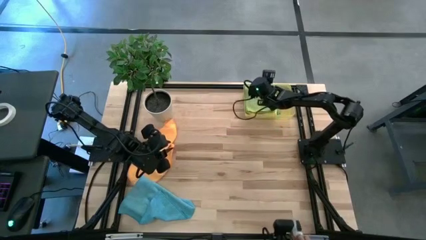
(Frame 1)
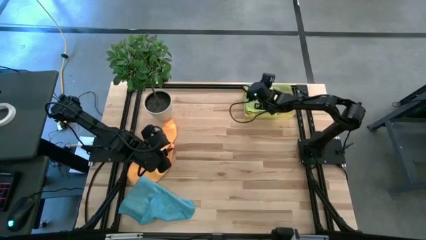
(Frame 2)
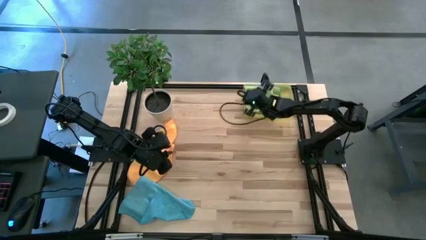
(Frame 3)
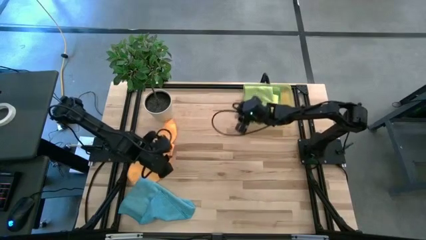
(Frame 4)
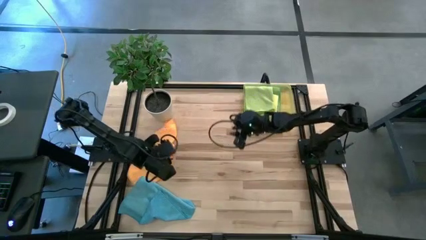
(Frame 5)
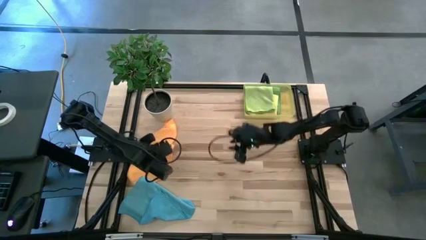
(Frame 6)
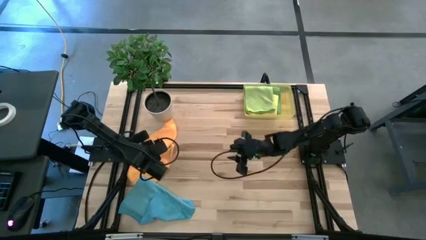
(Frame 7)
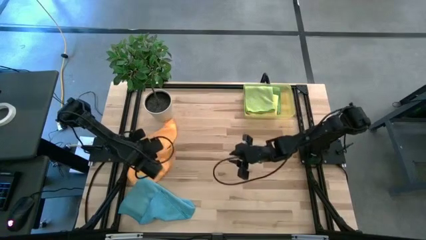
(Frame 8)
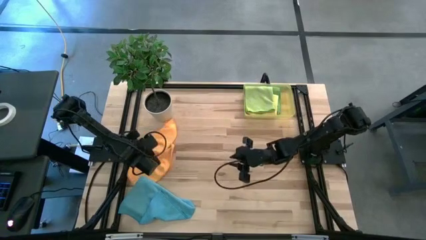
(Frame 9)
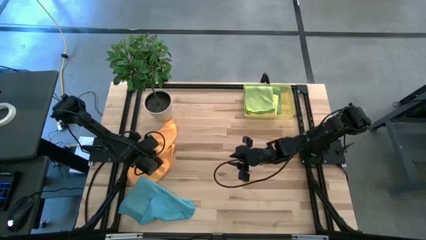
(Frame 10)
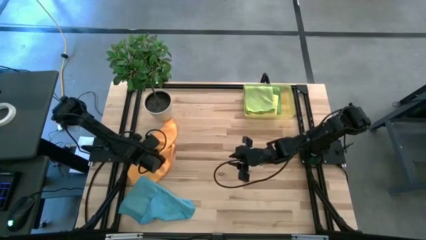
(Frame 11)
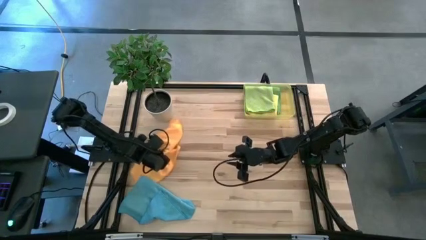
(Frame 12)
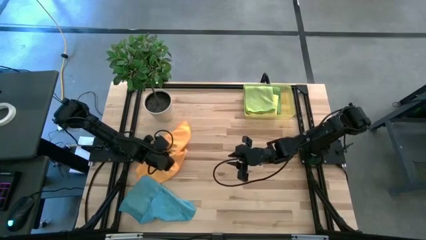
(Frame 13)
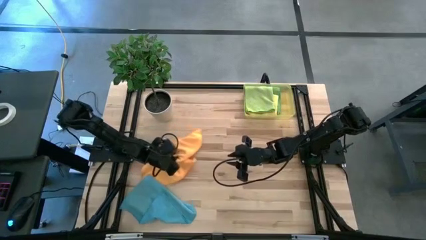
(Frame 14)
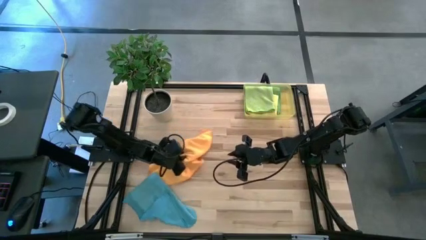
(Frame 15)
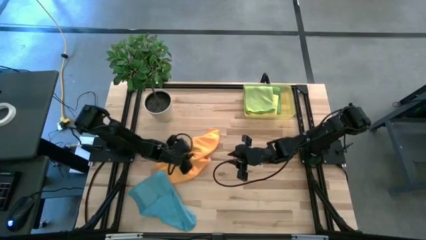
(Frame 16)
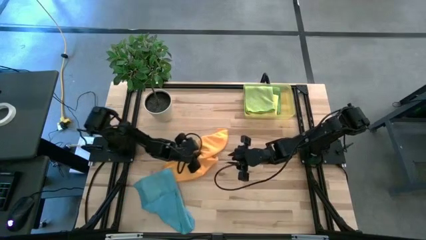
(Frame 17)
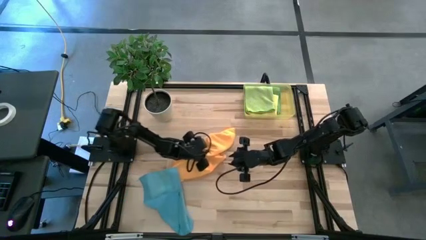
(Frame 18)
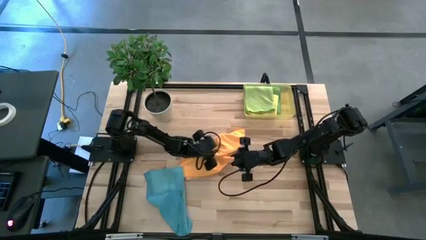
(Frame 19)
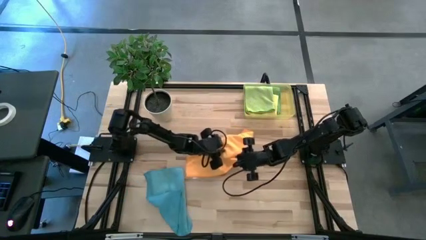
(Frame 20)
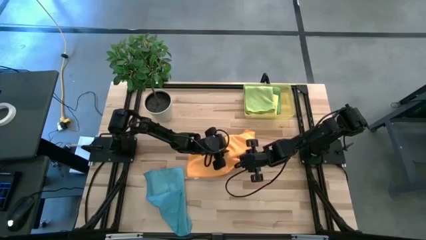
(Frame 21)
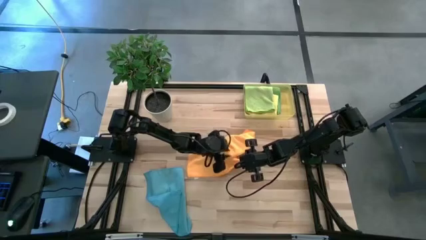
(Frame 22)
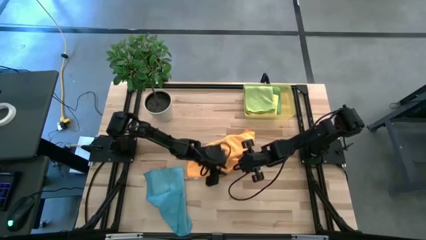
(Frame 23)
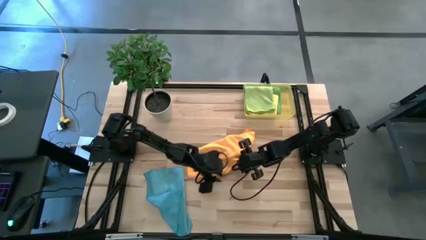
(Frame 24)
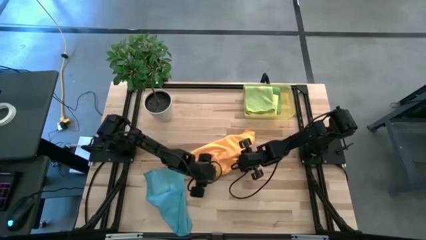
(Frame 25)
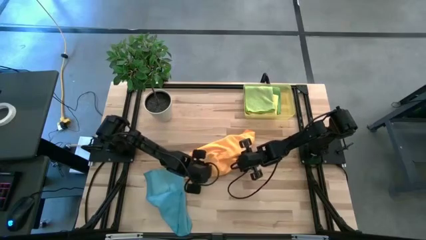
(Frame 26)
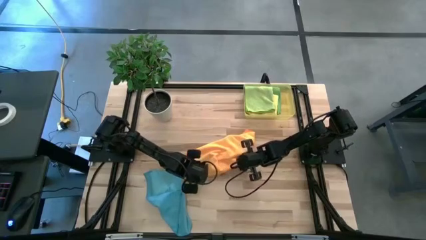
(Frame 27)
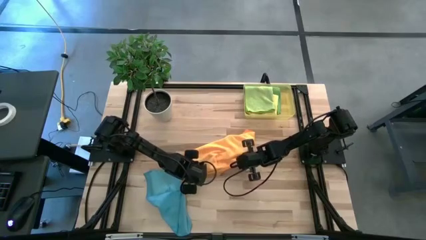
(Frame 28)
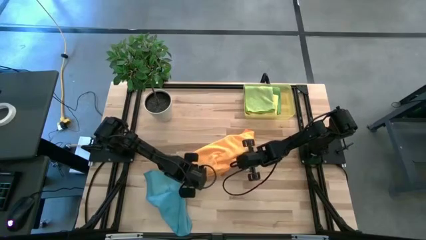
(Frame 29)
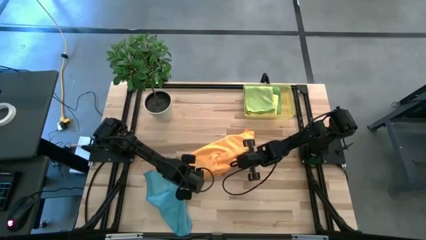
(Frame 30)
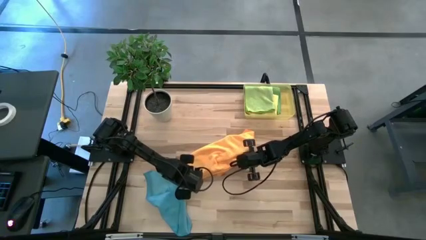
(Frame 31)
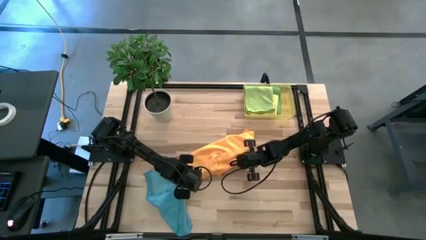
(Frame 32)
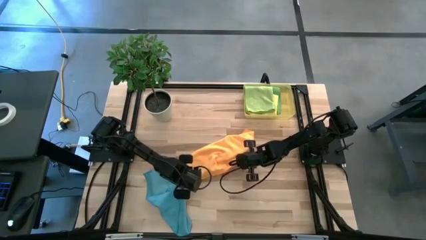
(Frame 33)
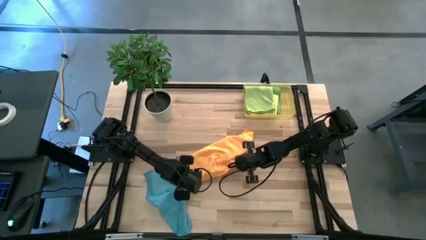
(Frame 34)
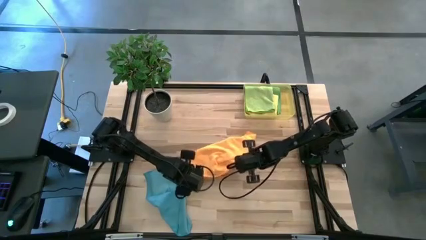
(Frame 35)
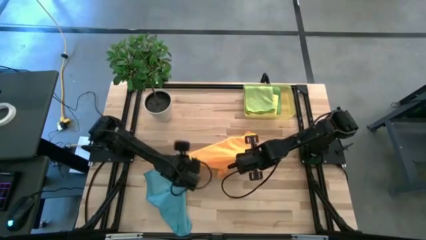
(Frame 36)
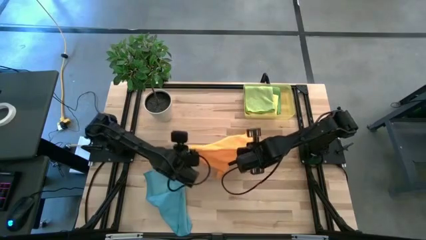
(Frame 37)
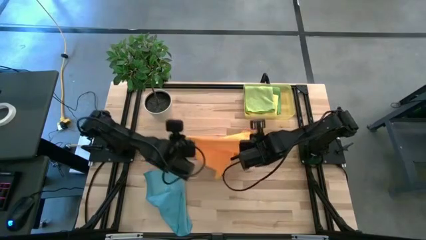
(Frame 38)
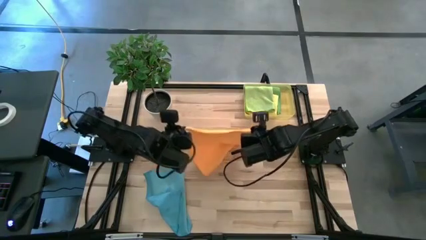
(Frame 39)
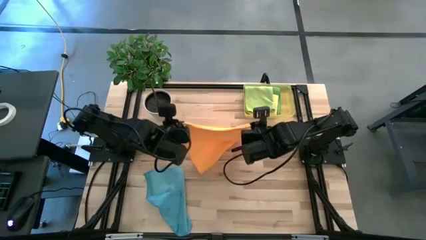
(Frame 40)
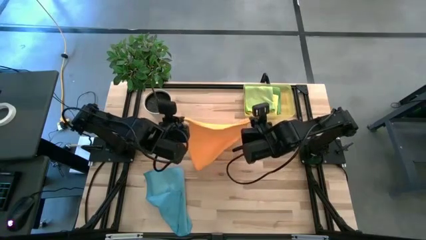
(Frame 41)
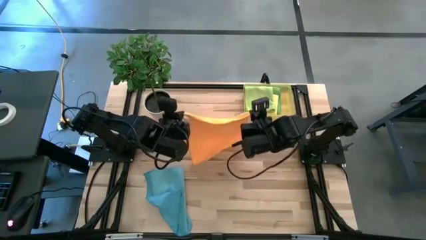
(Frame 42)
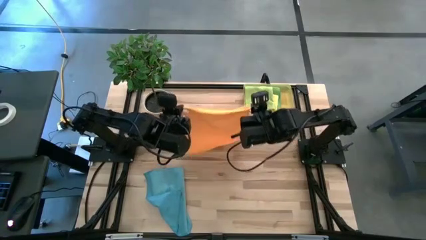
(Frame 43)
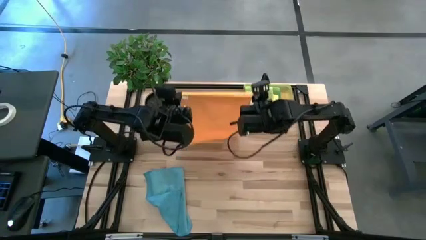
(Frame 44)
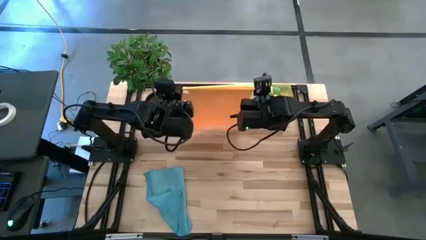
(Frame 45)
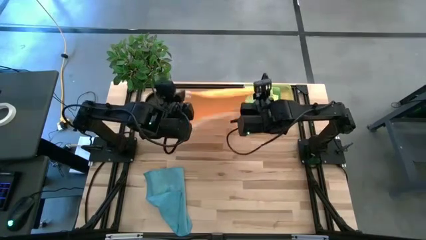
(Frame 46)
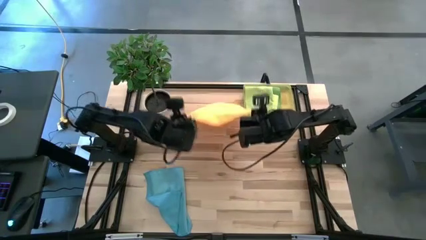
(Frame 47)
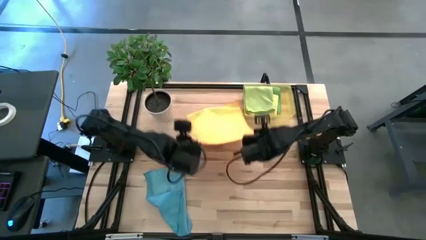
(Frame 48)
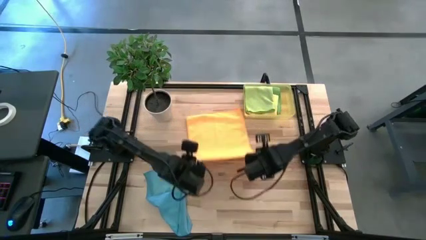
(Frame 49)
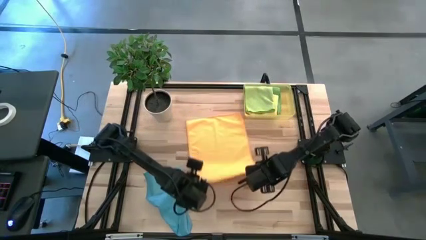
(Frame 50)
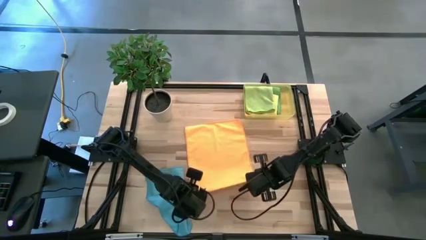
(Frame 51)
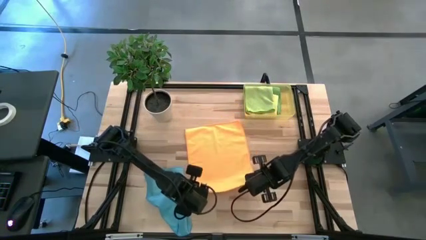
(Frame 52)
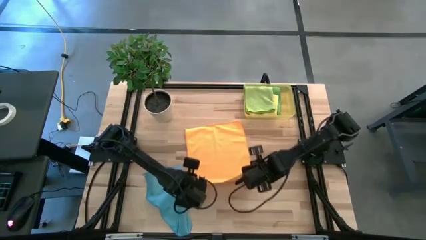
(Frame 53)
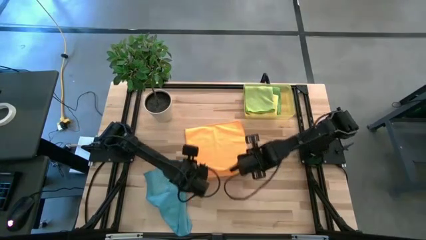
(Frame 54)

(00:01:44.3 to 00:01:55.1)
Task: Fold microfiber towels
Fold the orange microfiber towel
